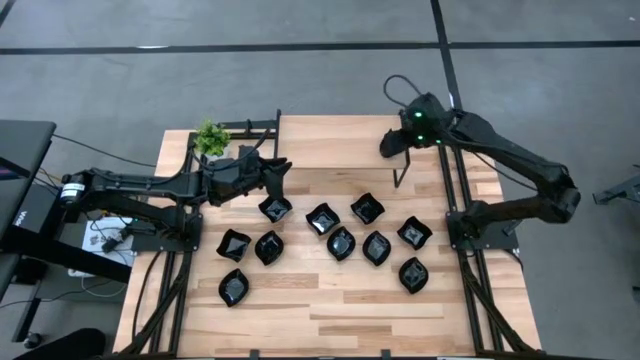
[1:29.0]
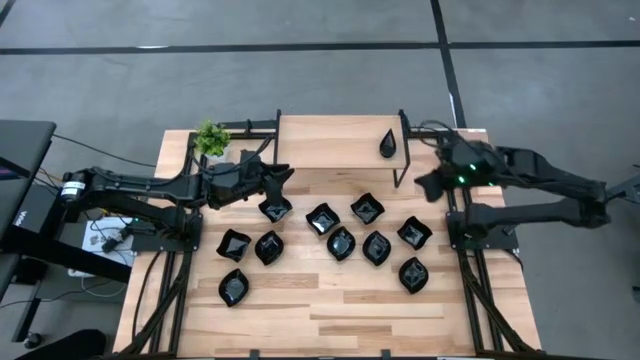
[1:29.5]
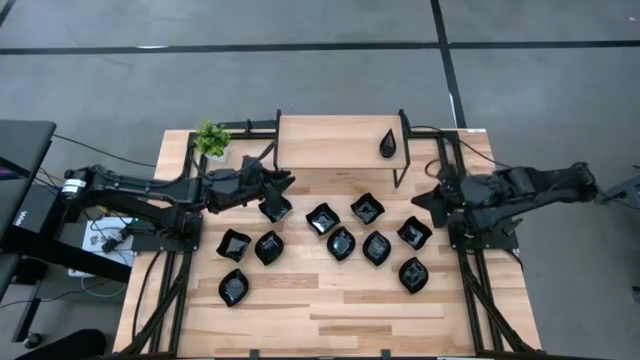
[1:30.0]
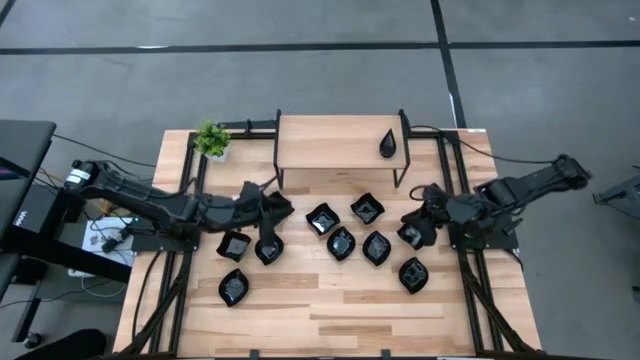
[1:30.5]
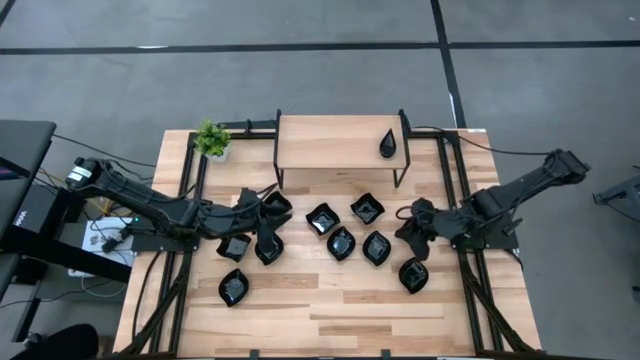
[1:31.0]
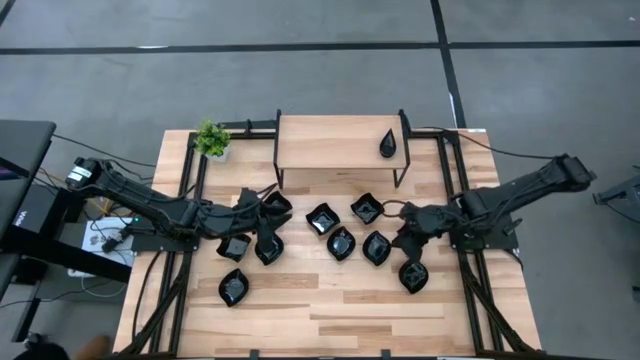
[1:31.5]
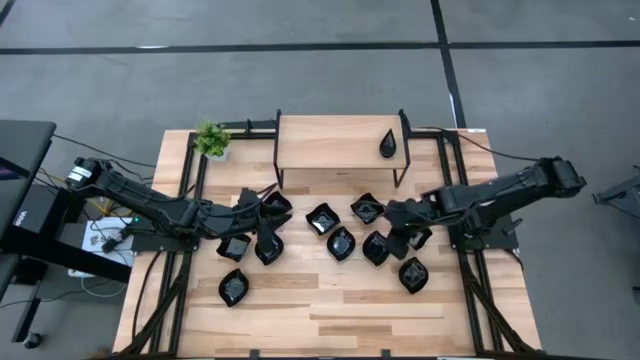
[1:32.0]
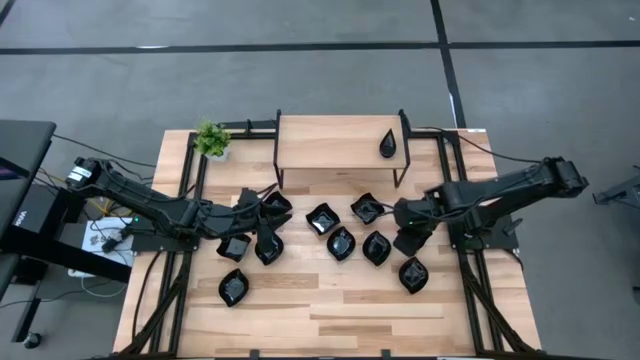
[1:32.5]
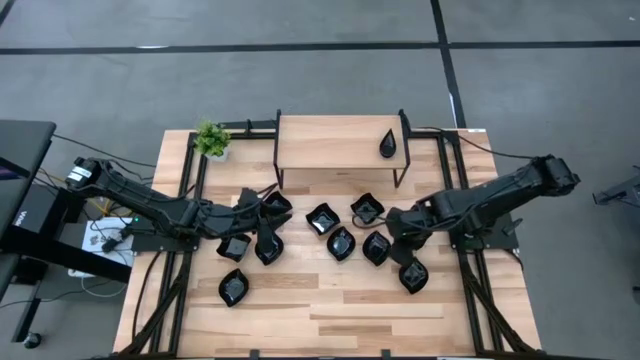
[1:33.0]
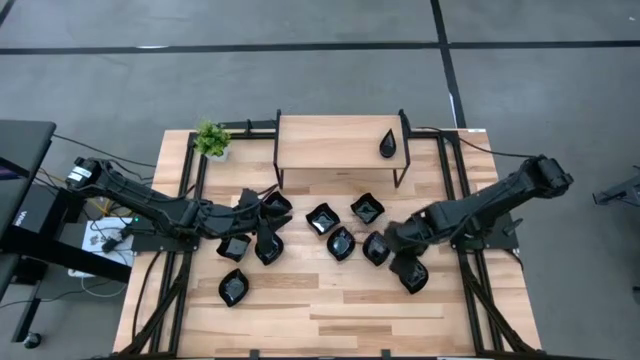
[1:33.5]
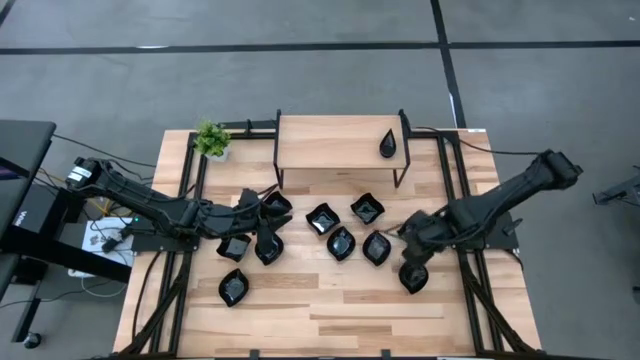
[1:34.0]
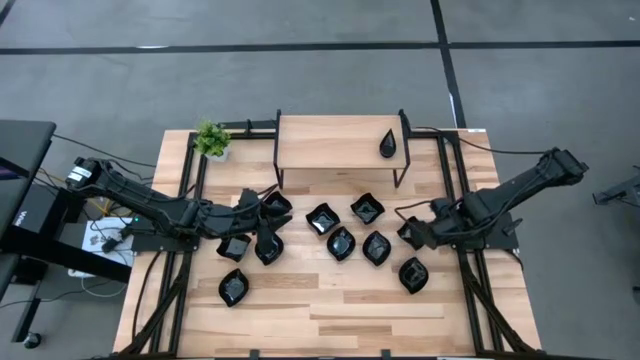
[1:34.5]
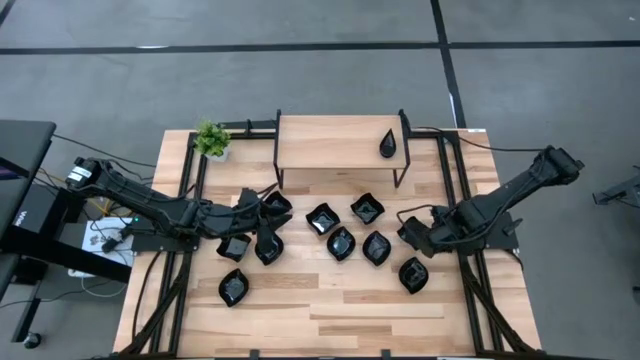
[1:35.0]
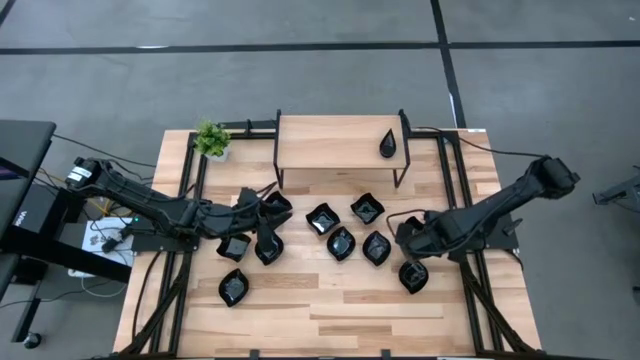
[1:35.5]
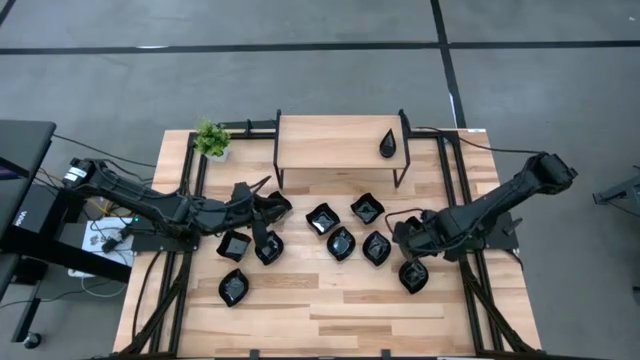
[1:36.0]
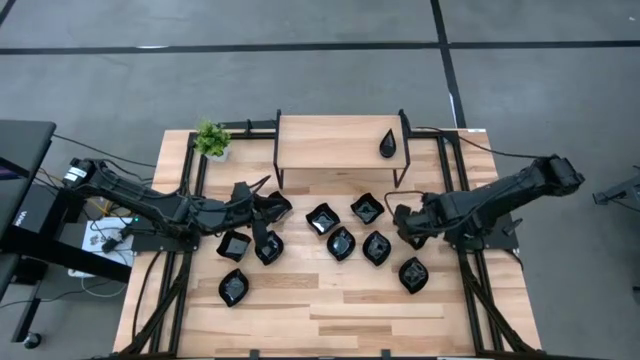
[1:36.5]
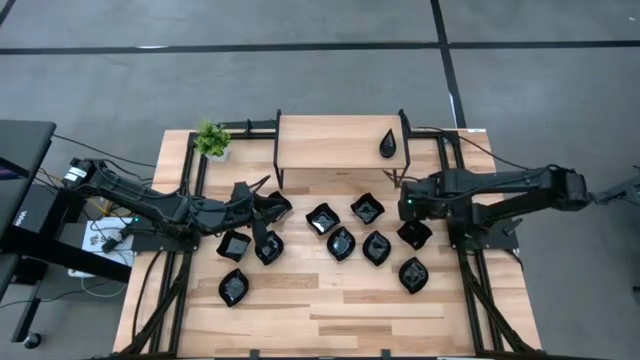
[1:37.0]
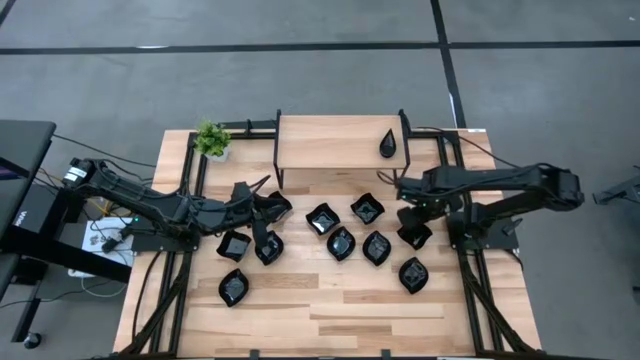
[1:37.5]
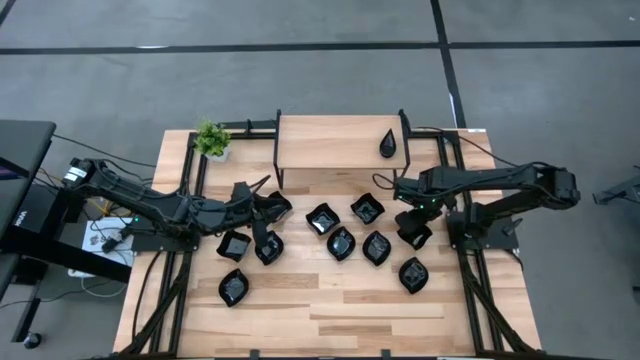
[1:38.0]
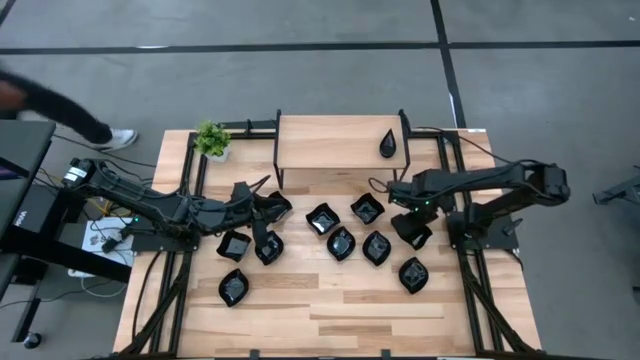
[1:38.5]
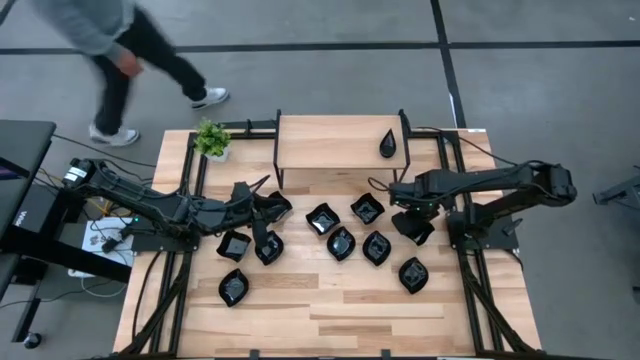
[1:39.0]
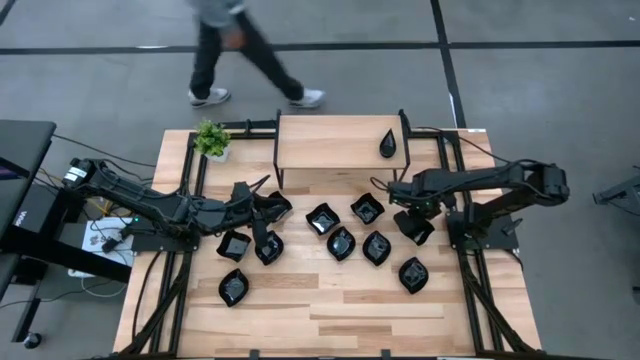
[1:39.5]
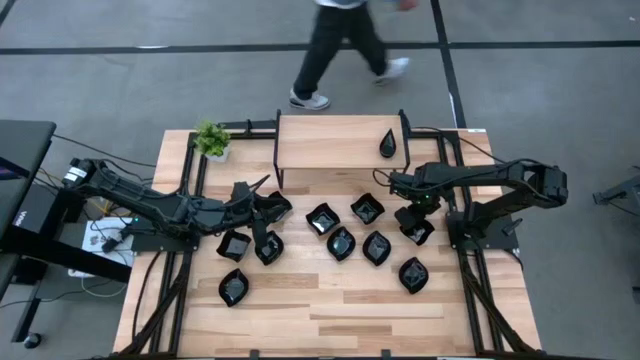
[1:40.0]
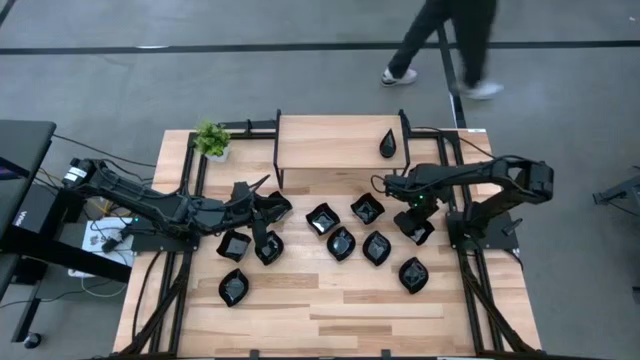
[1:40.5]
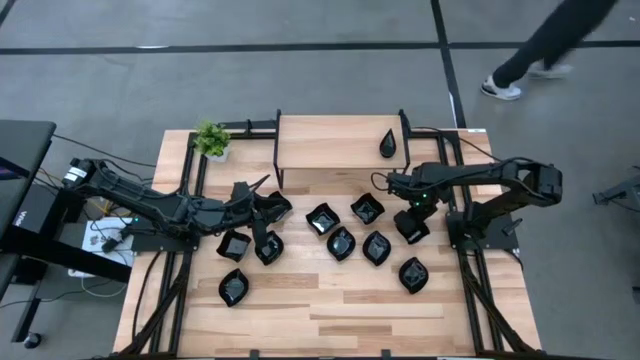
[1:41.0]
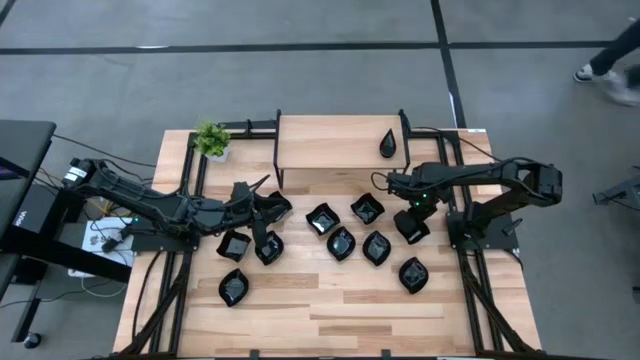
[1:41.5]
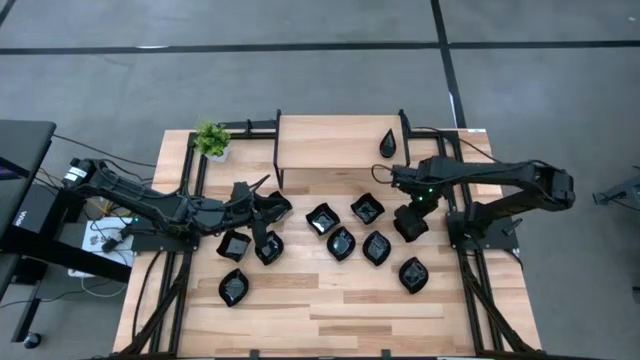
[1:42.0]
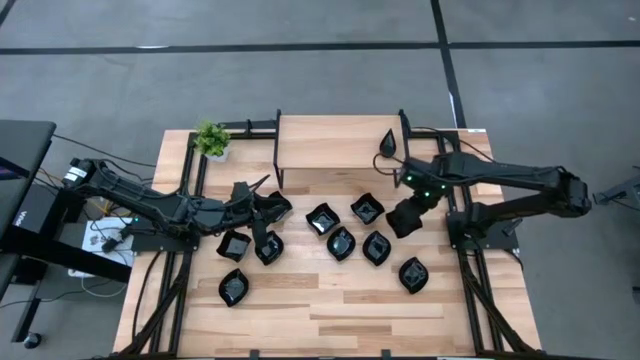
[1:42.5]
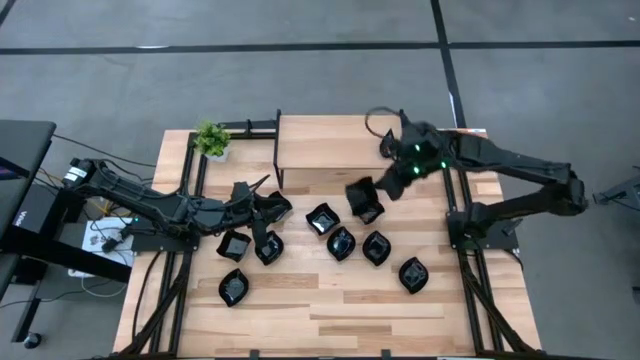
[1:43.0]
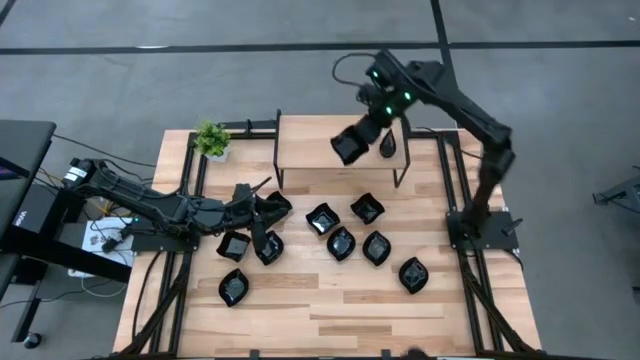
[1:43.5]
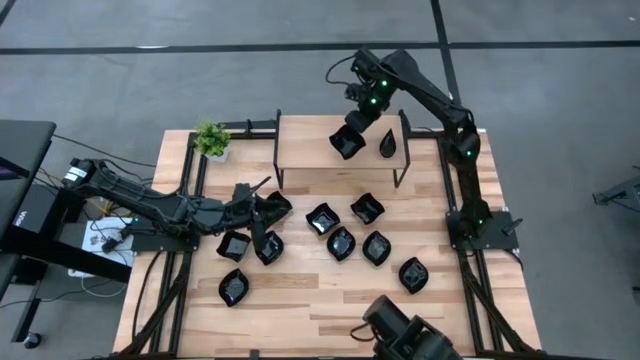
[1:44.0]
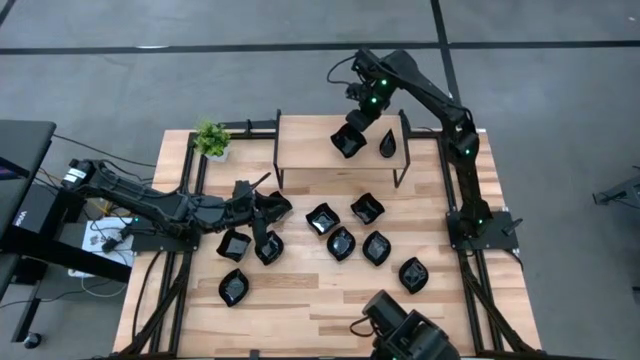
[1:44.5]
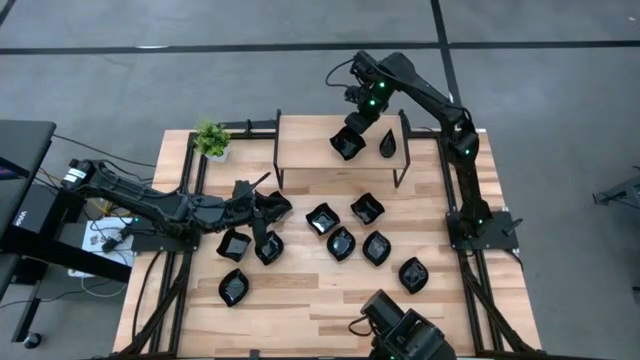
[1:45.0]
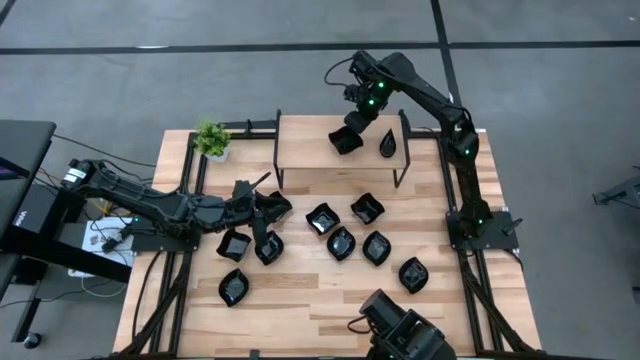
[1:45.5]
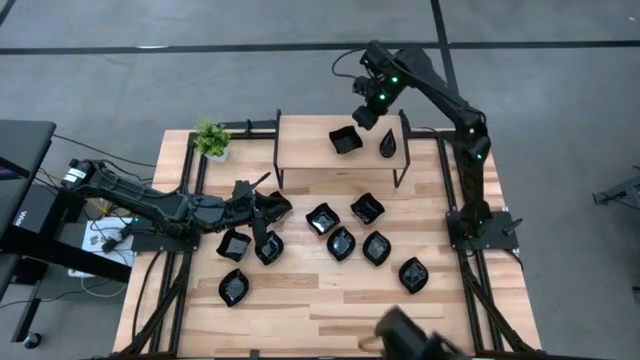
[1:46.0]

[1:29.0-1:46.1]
Task: Pick & Place Mini shaped plates
Put the black plate on the shelf

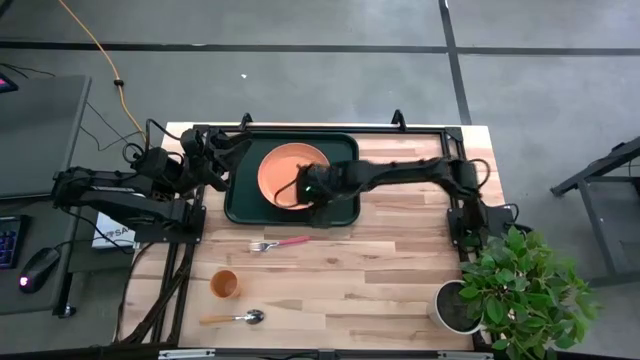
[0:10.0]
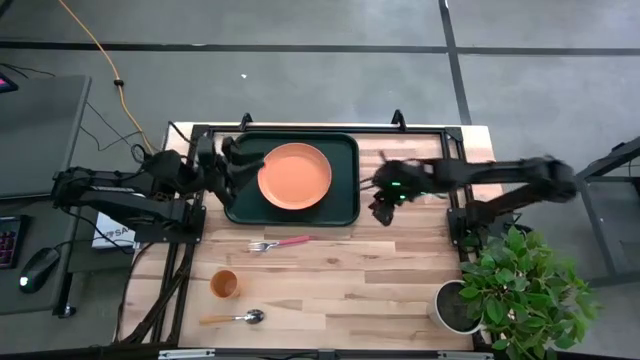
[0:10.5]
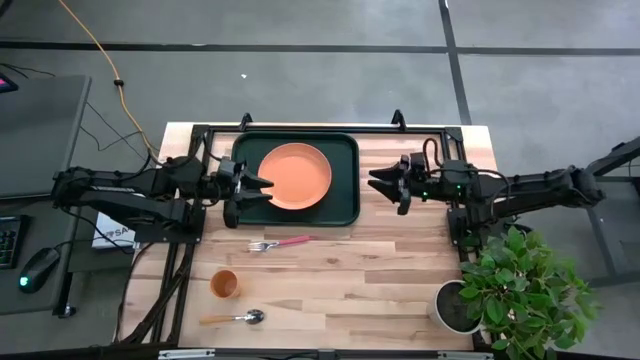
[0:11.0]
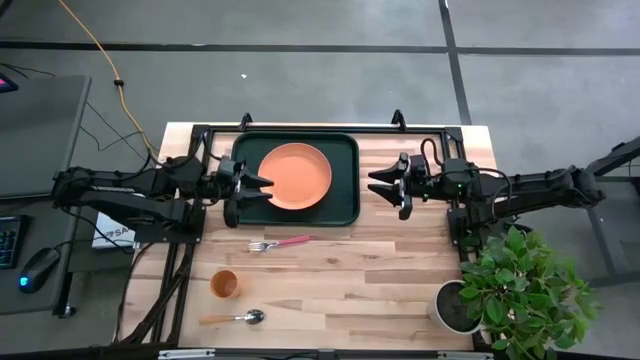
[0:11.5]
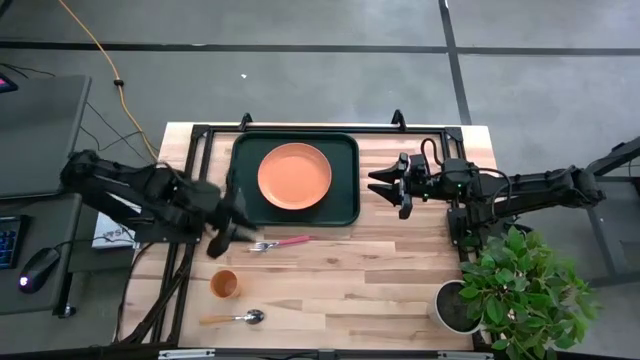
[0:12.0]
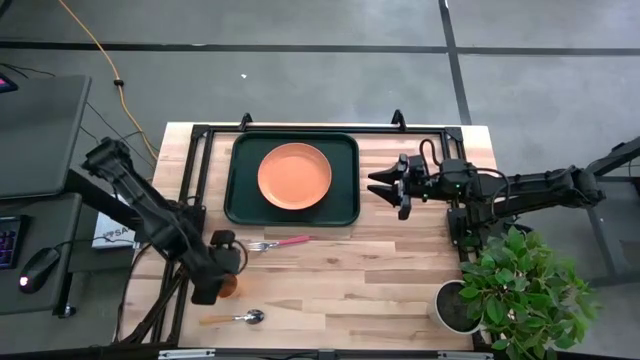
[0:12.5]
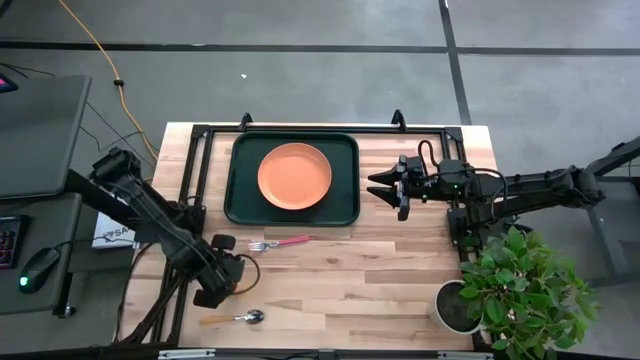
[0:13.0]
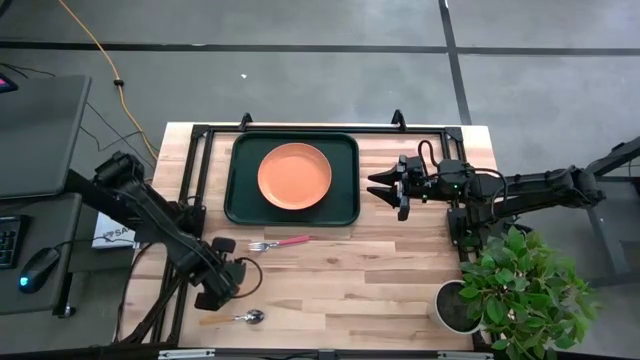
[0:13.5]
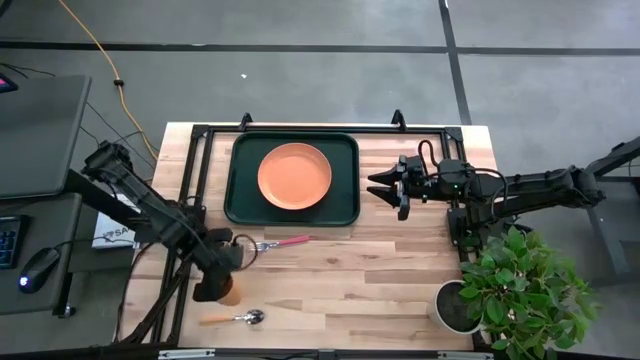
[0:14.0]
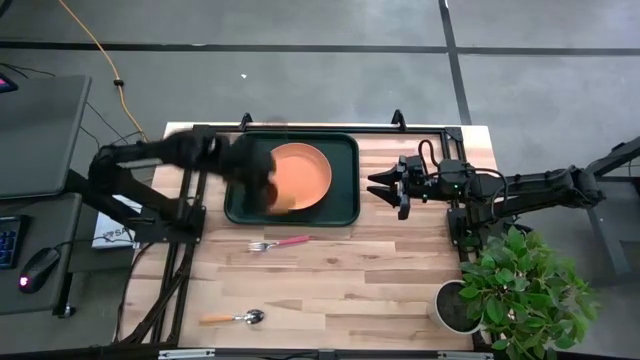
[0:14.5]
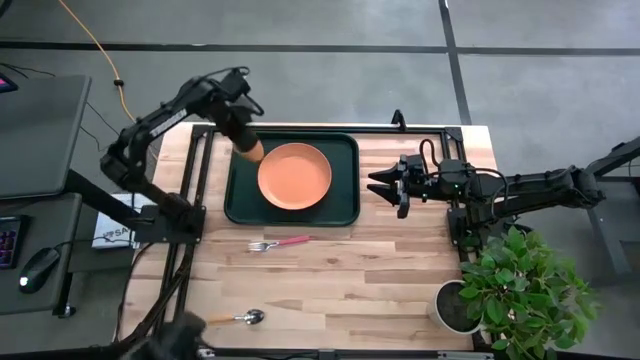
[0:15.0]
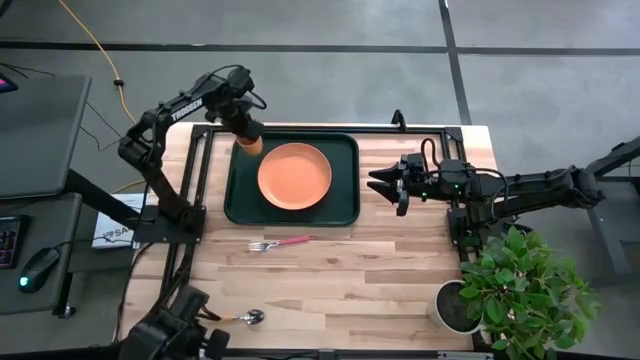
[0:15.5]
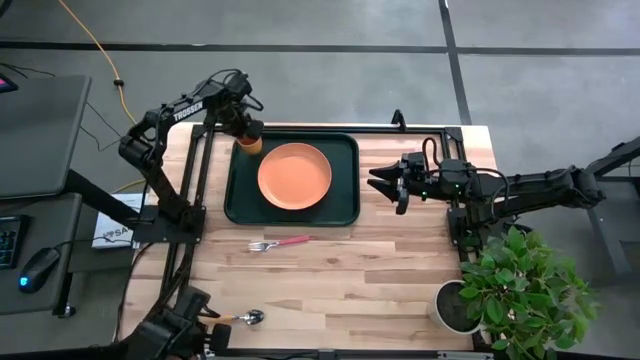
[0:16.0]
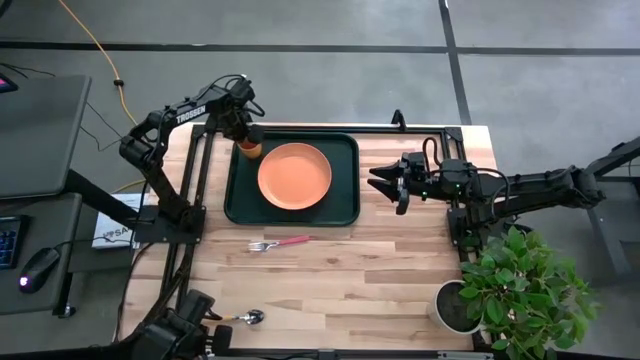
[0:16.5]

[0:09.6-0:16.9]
Task: Pick and place plate/cup/fork/spoon on tray
Put the orange cup on the black serving tray
